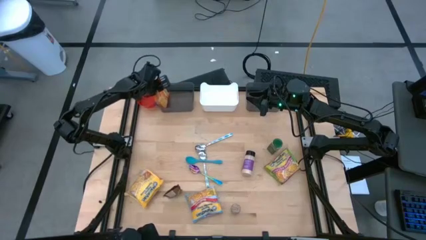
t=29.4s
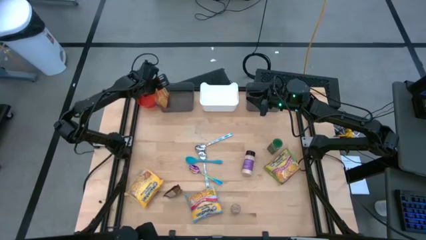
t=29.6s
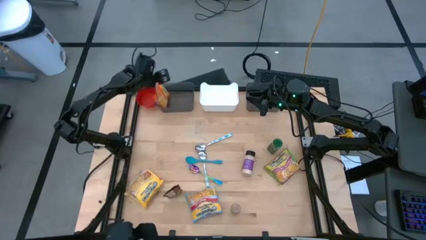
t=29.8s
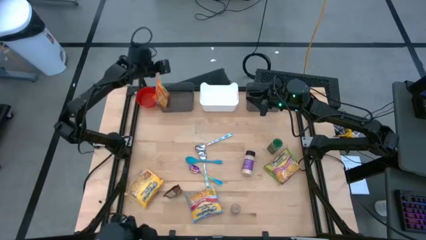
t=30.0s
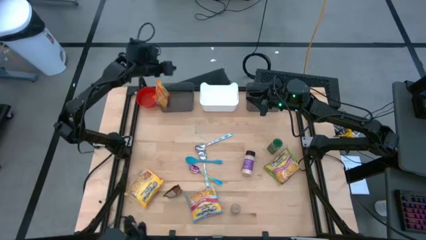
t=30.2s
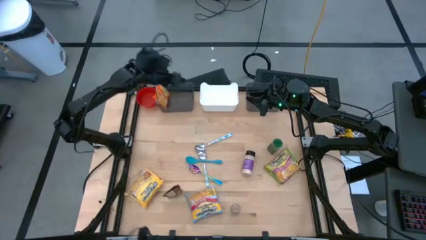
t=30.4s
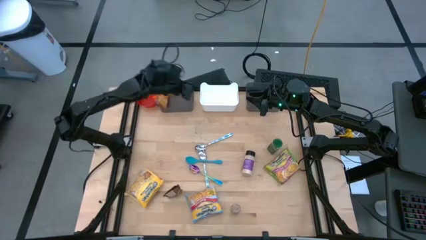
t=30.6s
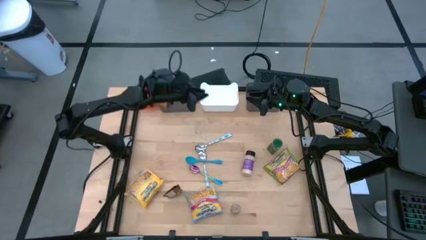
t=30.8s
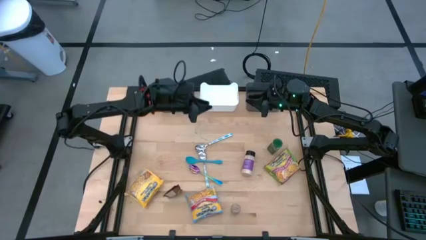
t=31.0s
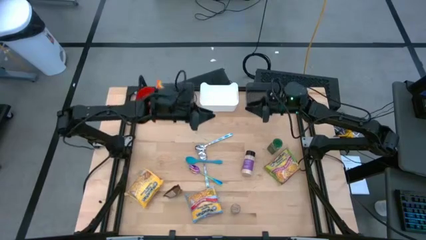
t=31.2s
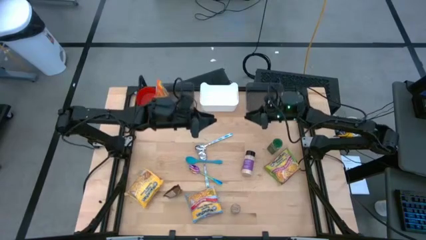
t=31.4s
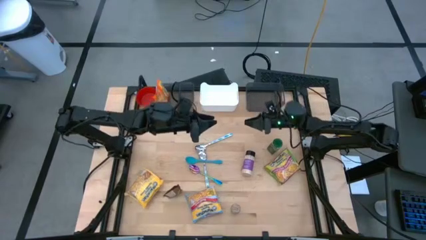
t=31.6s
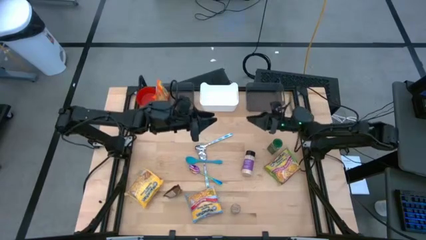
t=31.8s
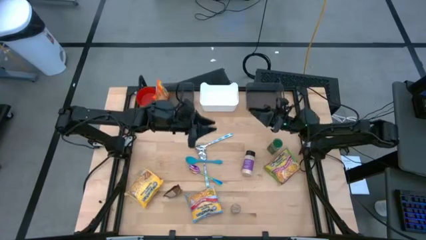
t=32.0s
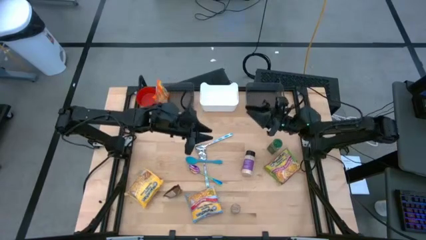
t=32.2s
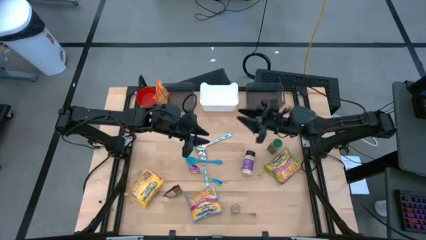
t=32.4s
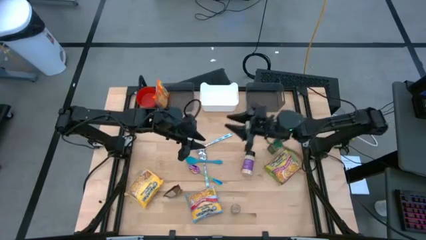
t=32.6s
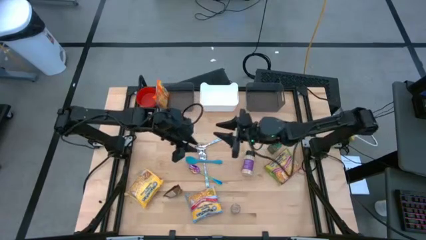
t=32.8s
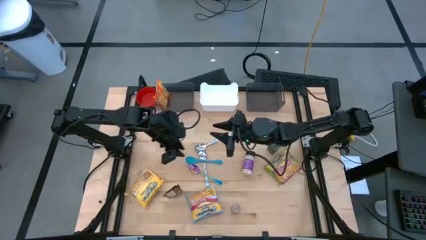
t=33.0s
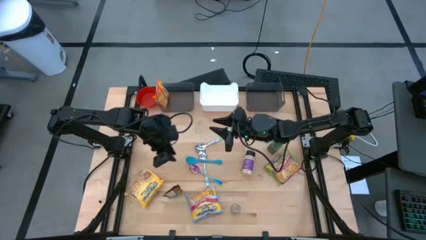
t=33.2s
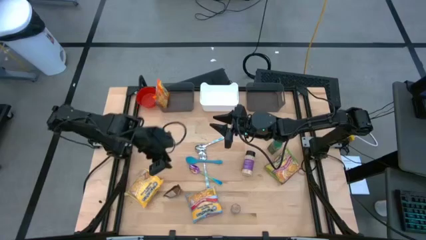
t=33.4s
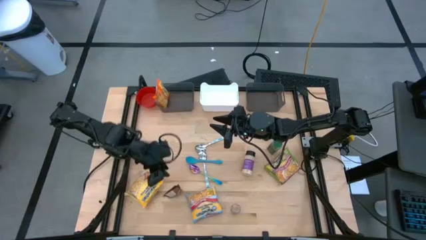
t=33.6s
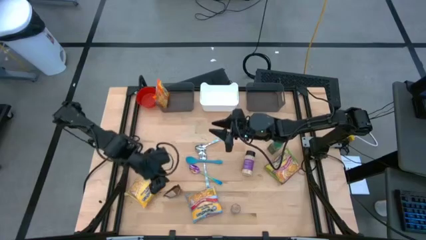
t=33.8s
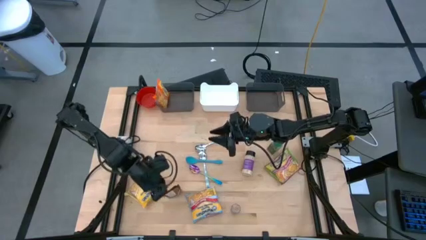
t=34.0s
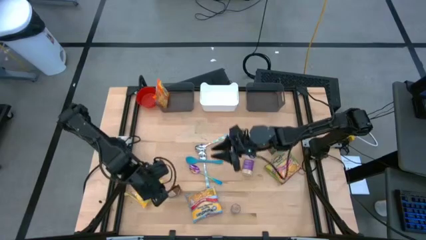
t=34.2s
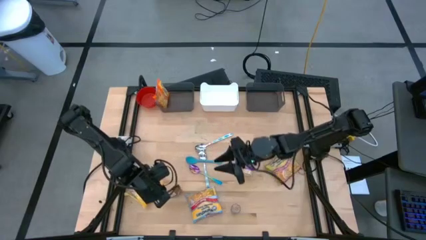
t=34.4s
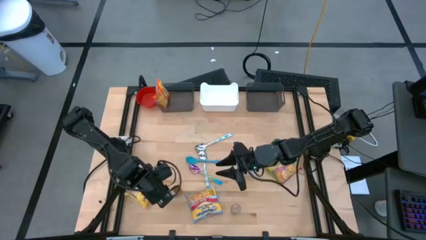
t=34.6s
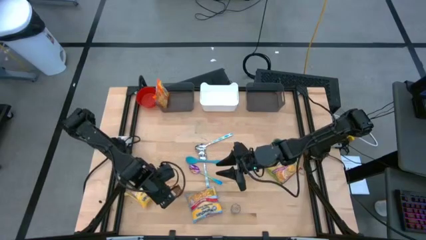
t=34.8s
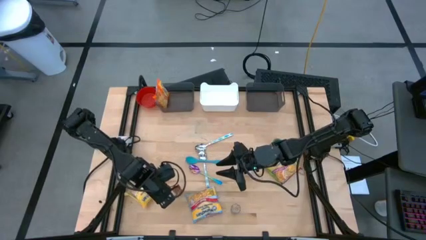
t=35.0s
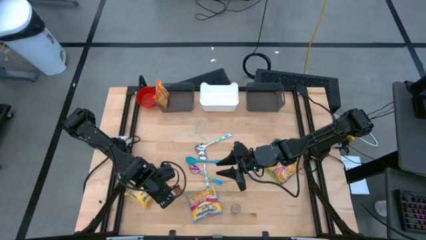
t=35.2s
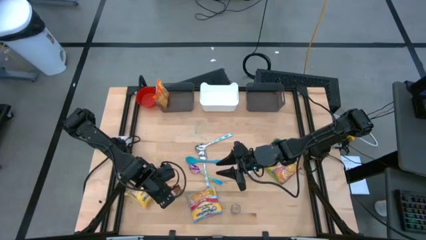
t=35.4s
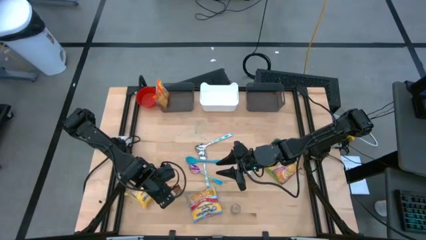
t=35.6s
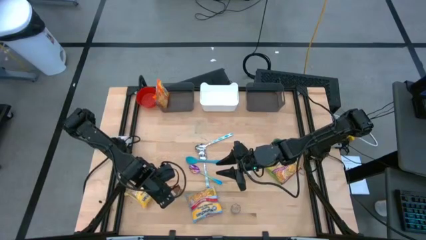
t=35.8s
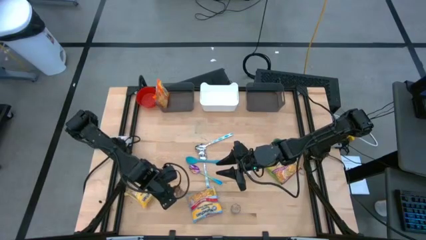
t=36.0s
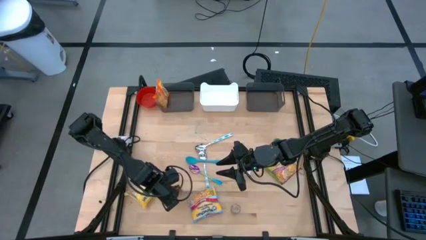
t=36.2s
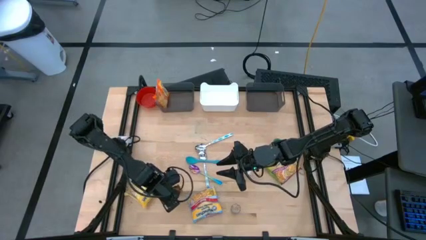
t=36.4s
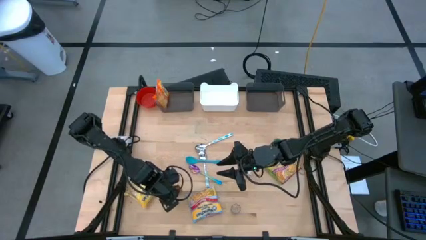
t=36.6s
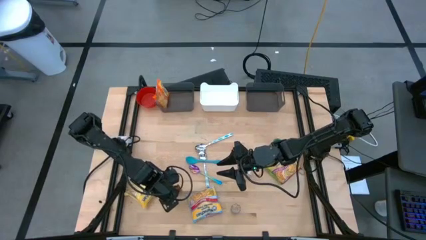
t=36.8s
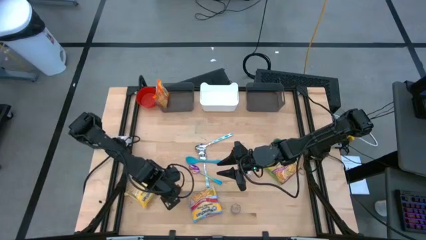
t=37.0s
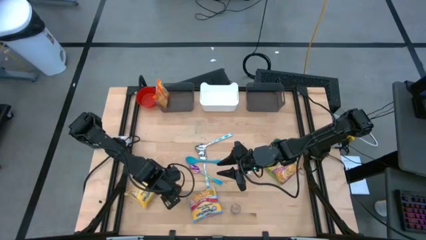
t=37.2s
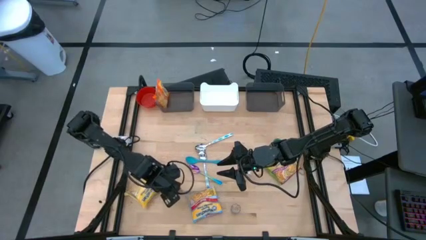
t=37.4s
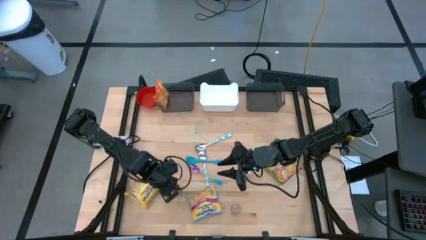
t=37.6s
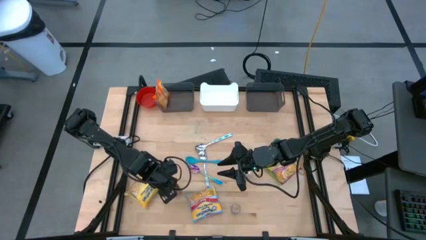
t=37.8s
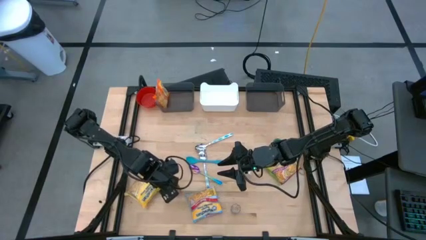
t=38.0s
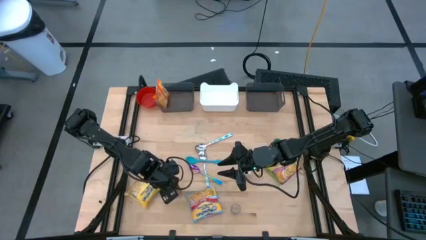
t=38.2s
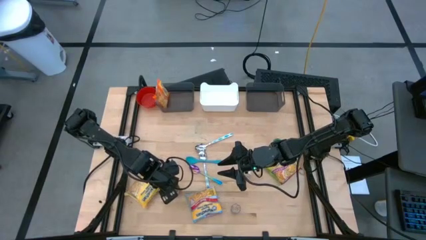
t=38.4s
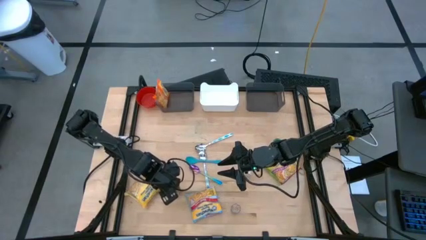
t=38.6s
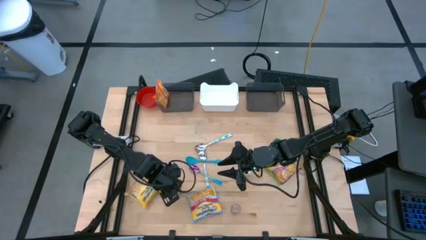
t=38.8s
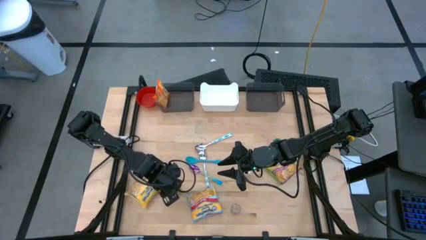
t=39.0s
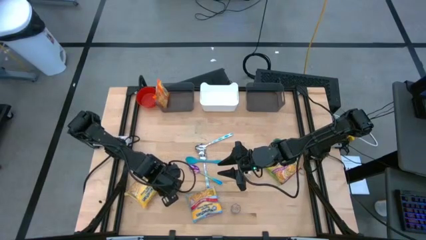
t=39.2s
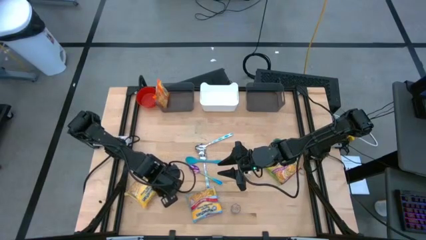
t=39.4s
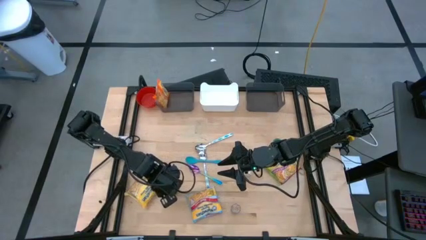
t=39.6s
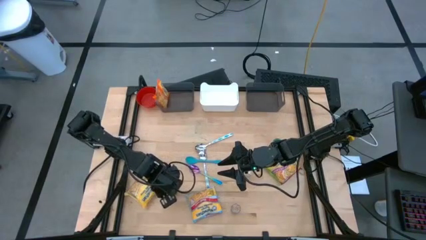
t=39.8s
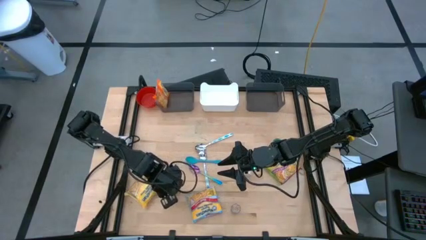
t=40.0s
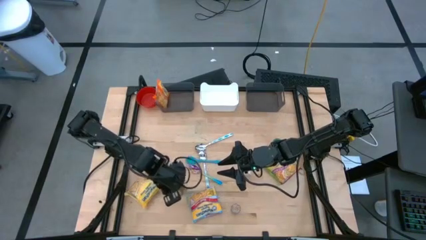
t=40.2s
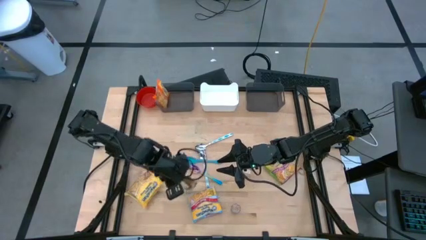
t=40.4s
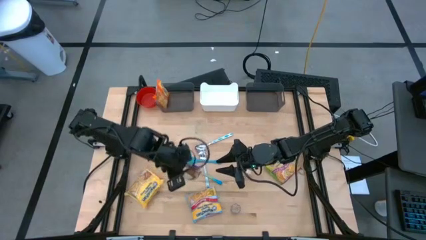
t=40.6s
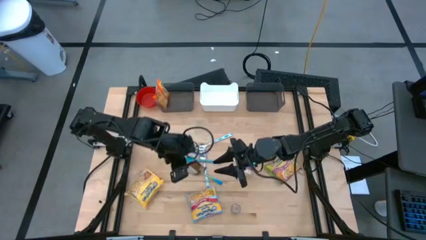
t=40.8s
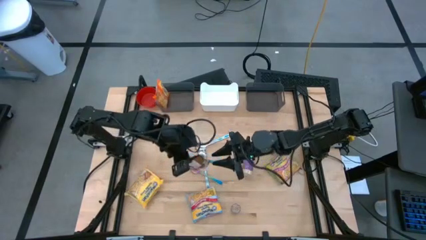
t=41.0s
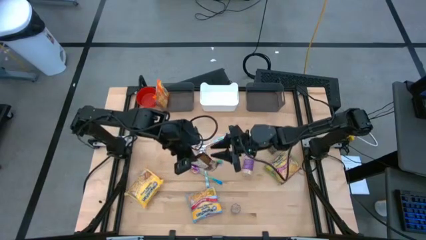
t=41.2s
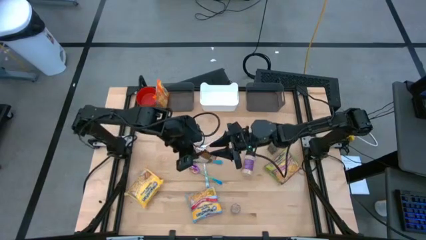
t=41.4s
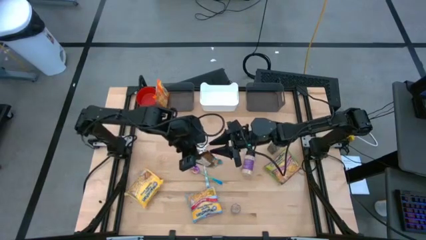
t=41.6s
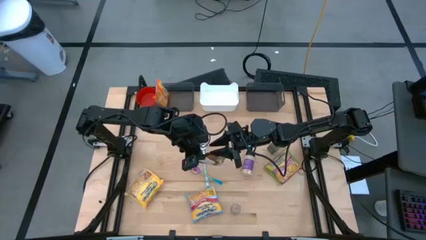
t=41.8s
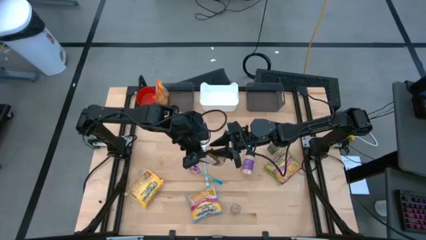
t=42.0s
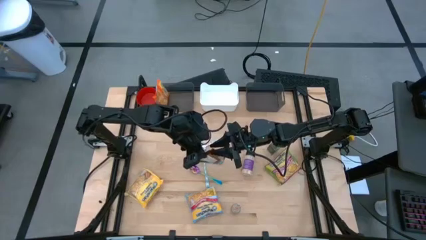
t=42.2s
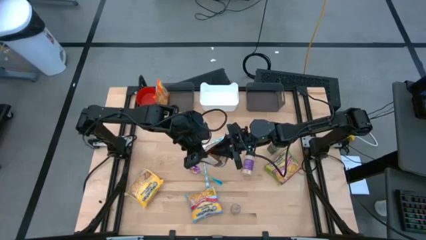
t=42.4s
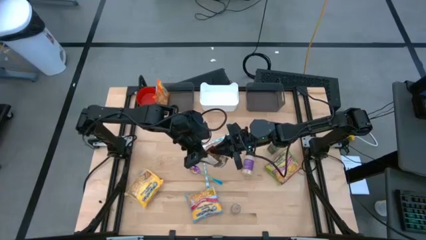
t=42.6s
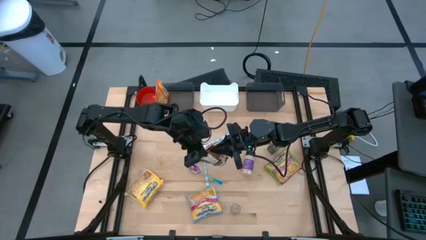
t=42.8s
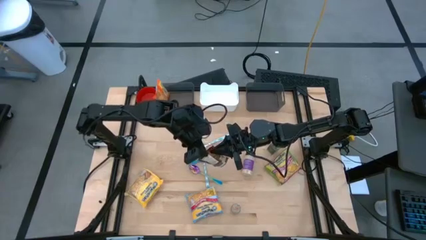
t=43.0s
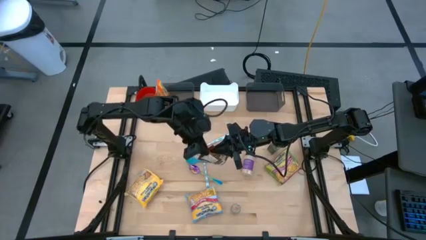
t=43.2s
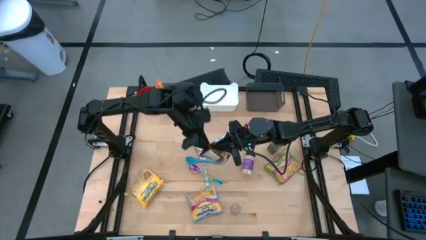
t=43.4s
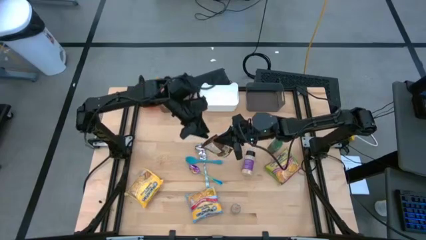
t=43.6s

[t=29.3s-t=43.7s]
Task: Pick & Place Food Item
Put the orange seasoning pack into the white bin
